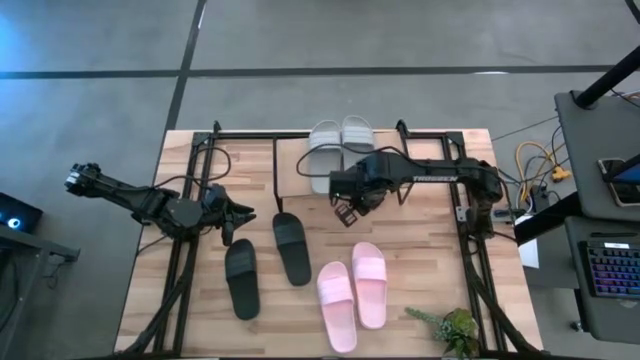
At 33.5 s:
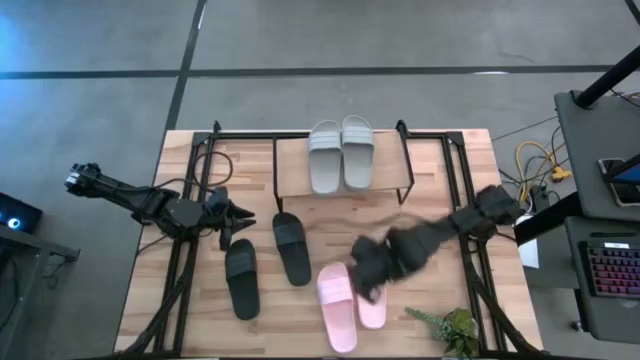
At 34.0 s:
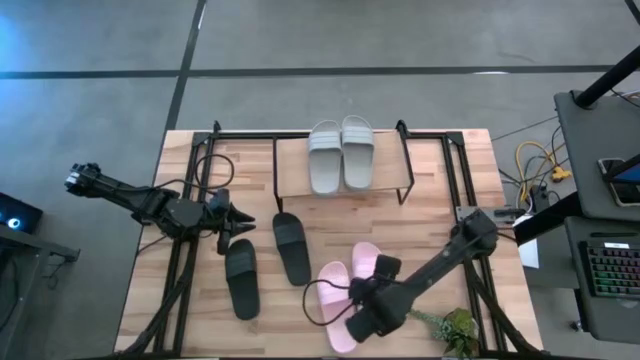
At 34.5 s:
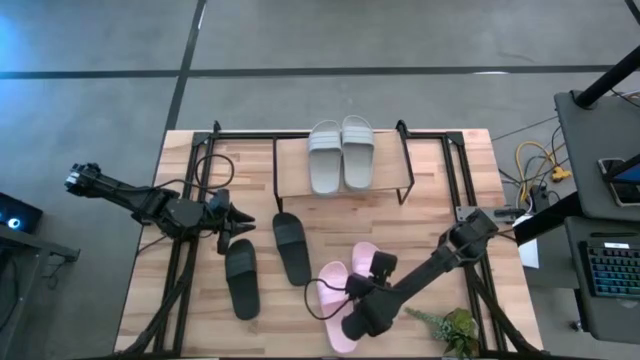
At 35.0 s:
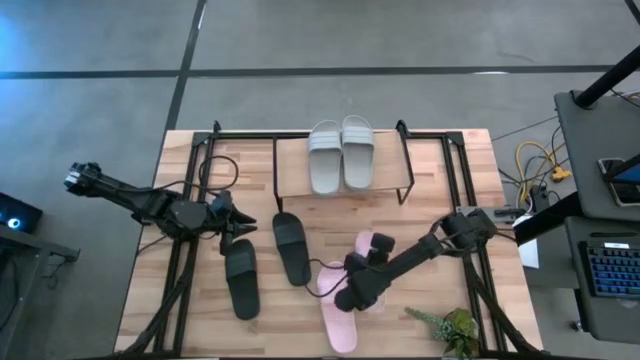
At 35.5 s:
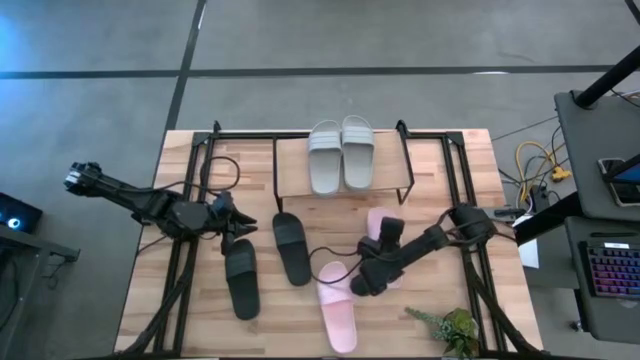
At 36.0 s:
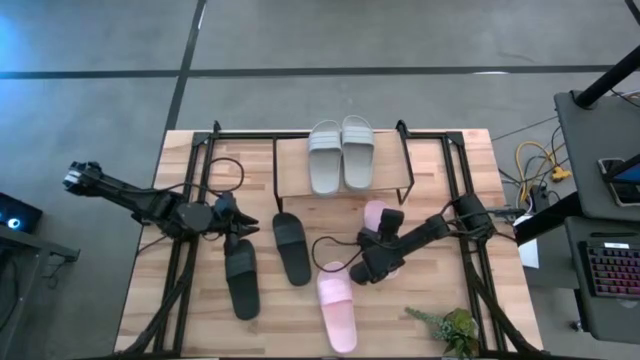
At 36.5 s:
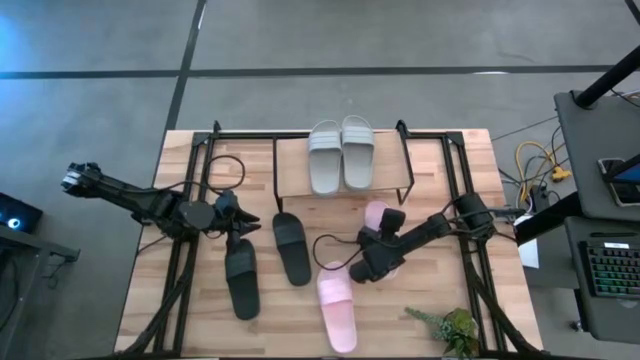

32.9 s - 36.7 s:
Task: Pick and place slides into the shelf
Put the right pink slide under the shelf

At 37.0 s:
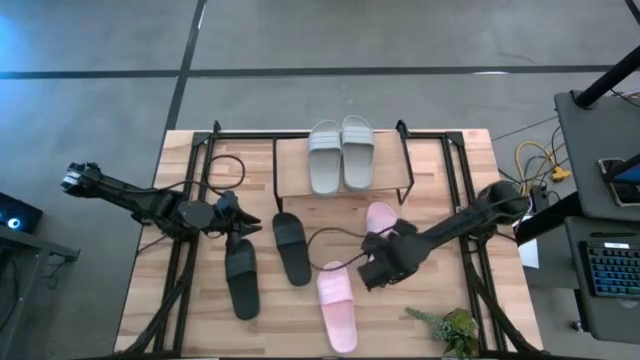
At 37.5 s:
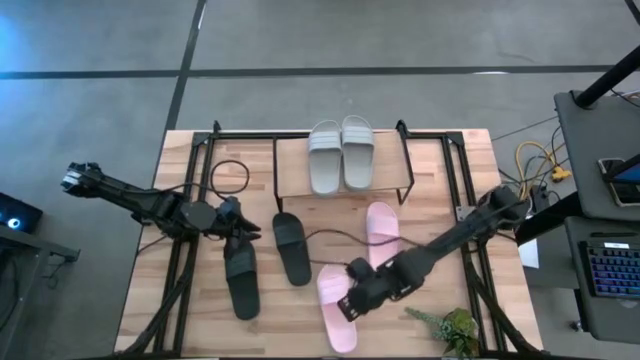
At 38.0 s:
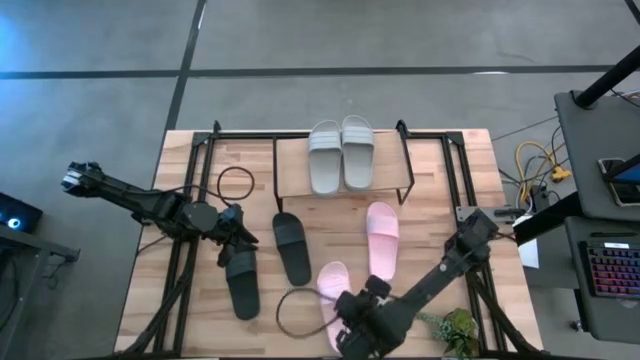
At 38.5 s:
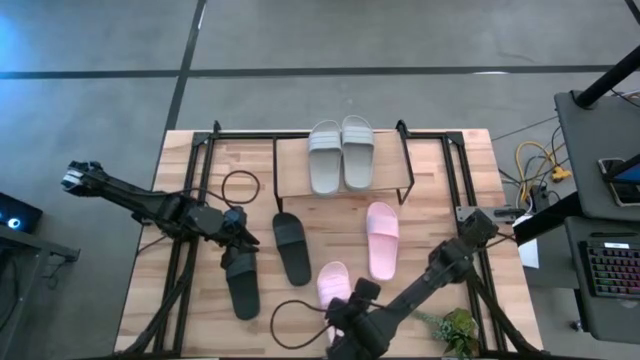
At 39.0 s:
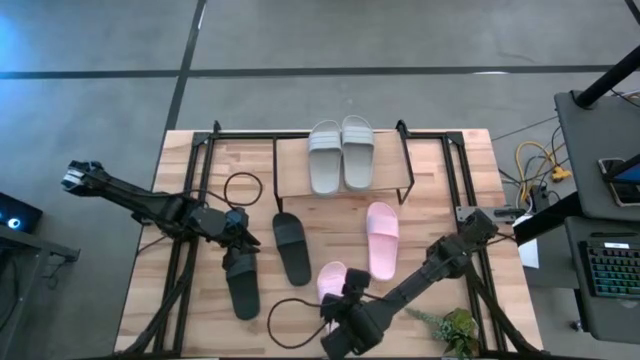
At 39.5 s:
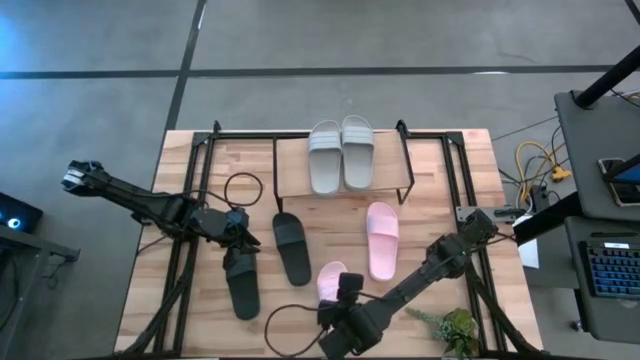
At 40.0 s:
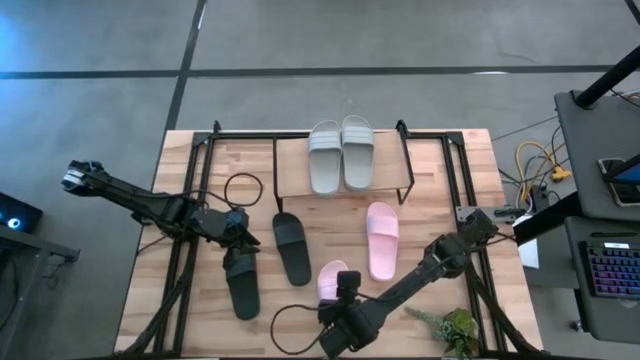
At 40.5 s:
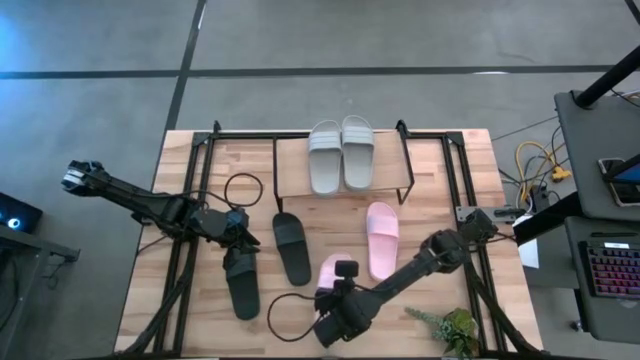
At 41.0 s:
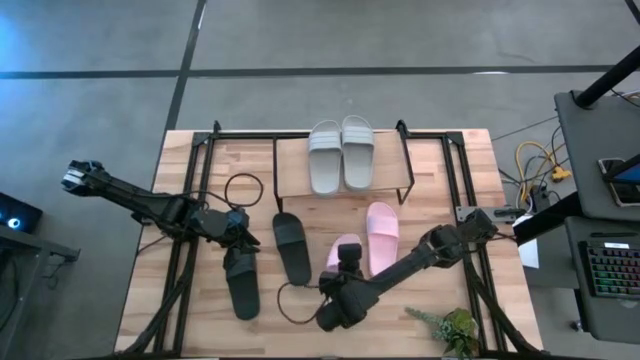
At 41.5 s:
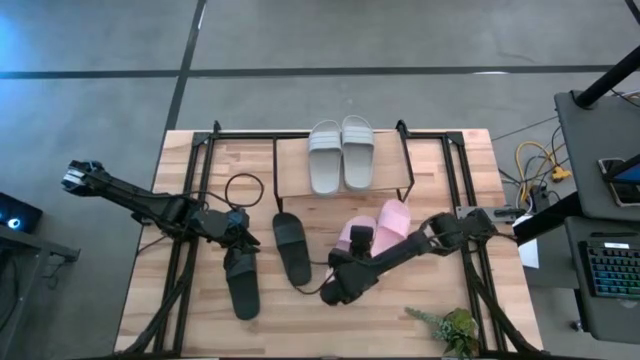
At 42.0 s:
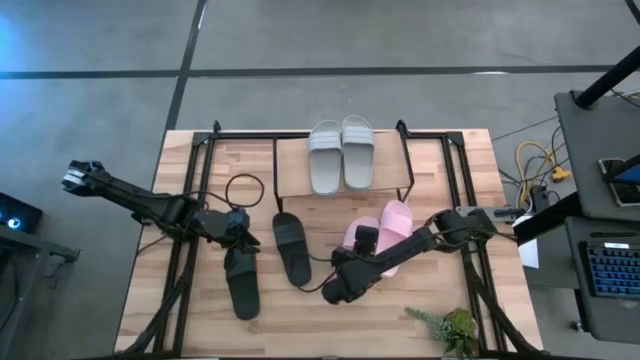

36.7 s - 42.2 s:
Put the pink slide under the shelf

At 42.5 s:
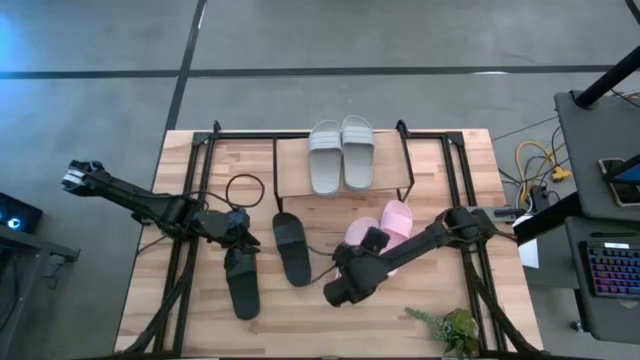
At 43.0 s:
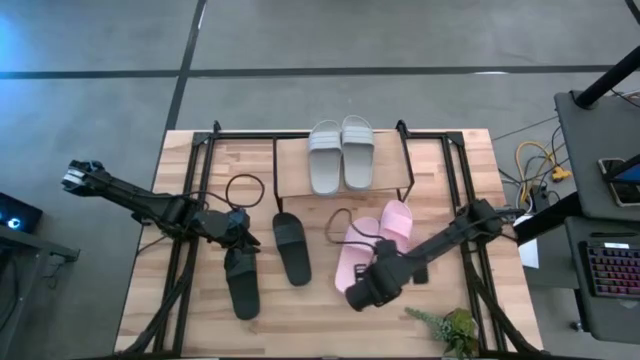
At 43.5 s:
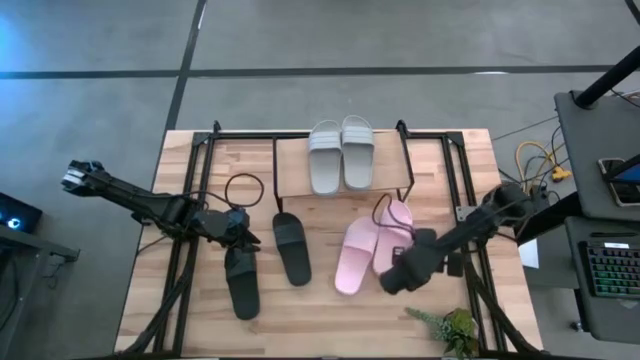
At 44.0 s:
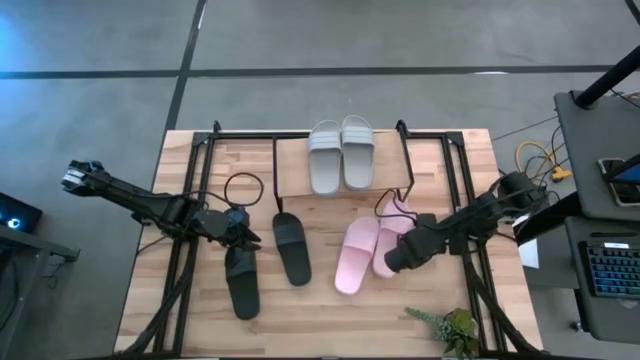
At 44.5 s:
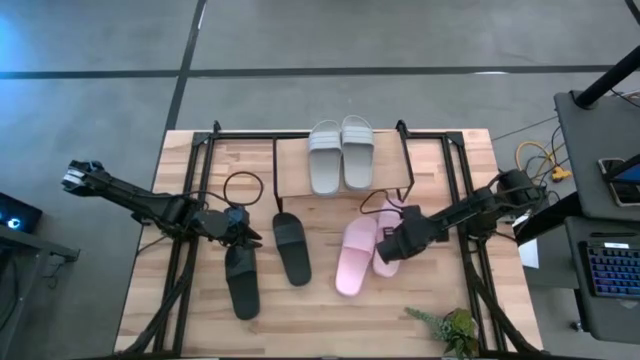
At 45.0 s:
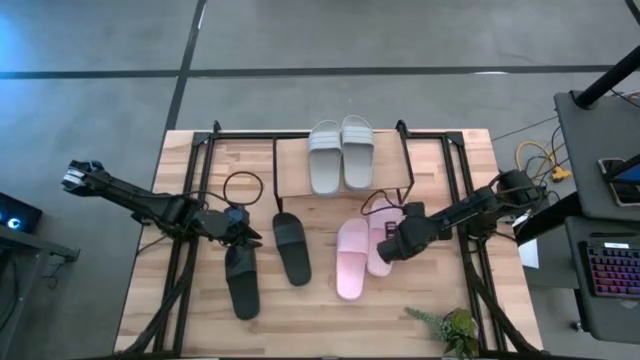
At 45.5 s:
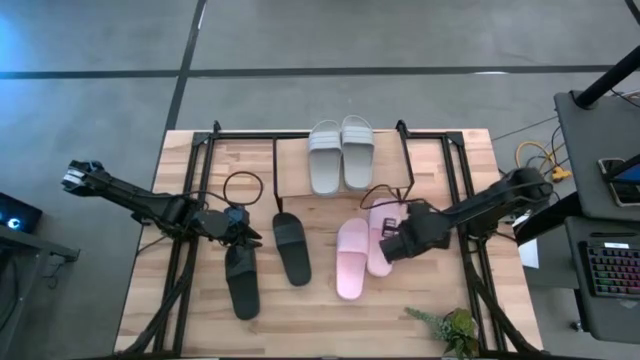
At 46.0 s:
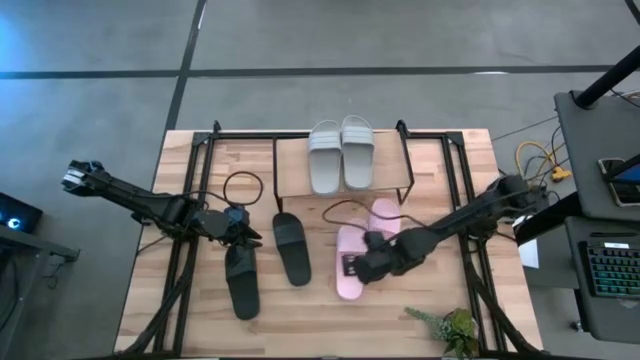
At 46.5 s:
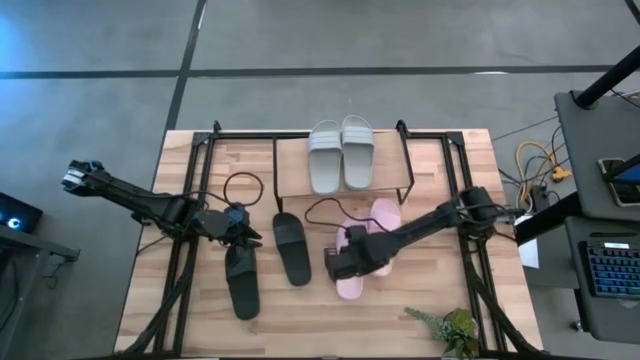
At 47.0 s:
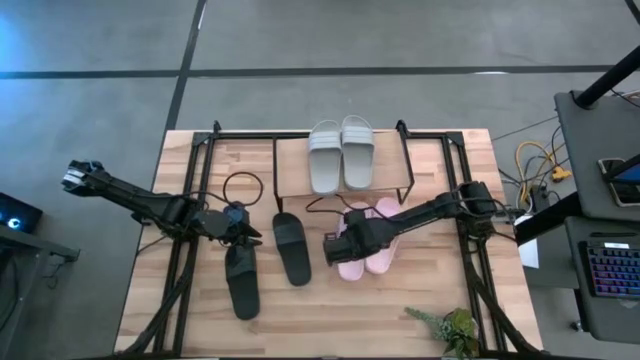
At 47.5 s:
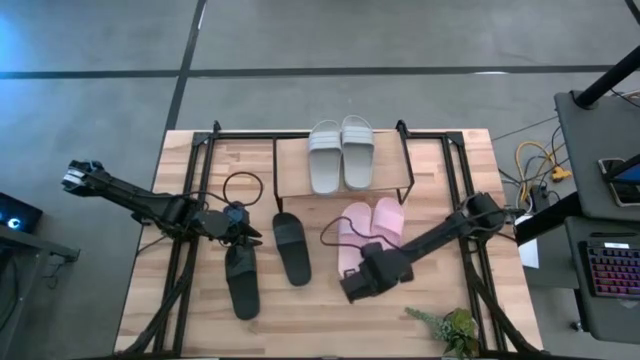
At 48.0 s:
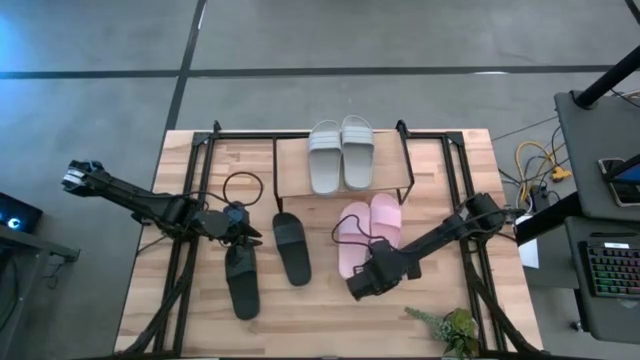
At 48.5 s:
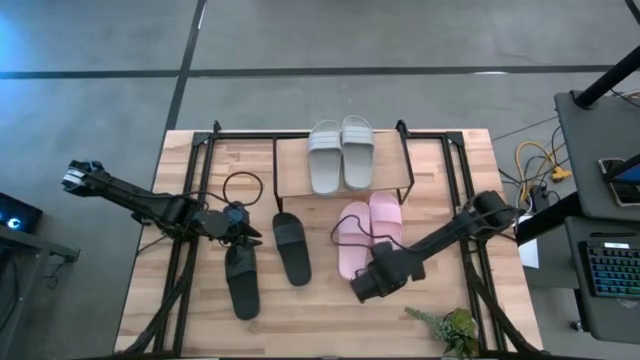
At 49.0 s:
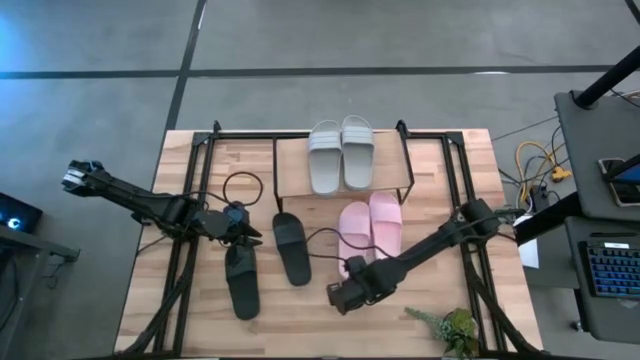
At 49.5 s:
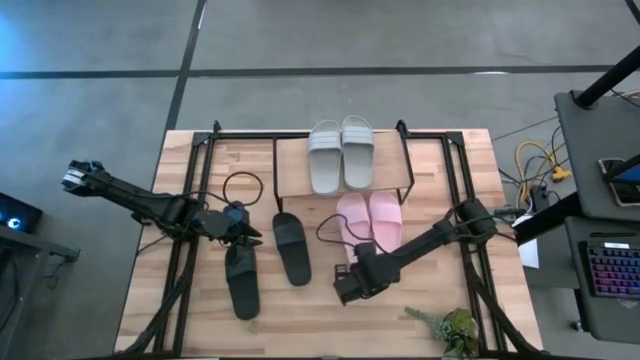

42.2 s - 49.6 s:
Adjust the pink slides under the shelf

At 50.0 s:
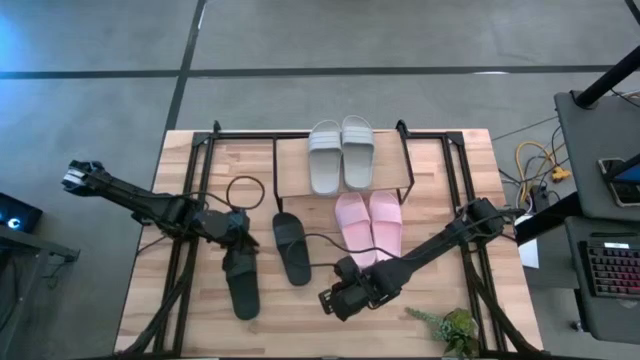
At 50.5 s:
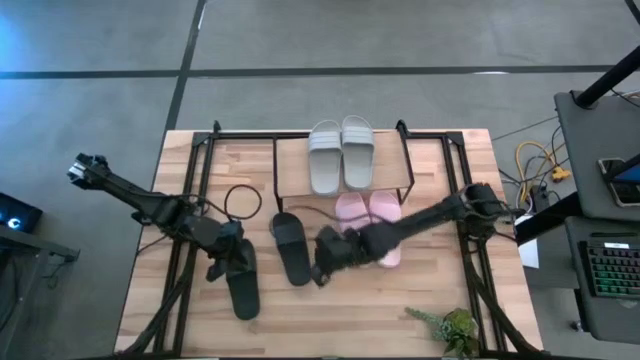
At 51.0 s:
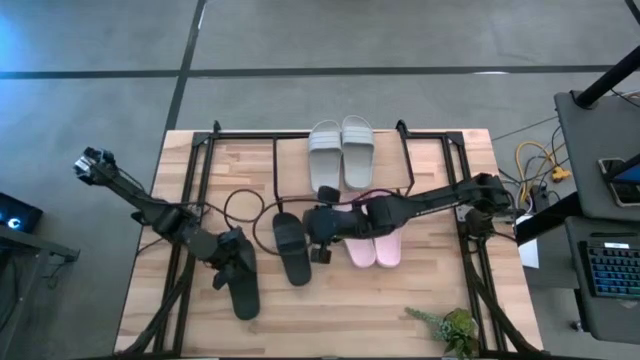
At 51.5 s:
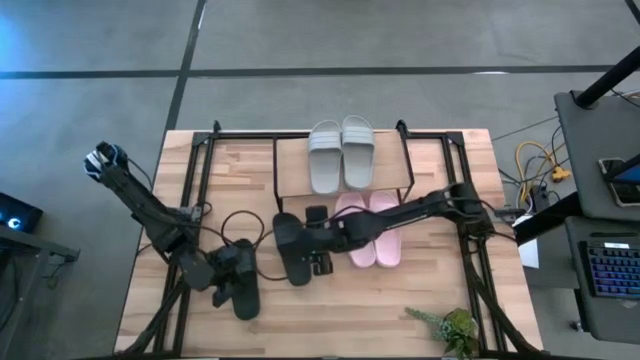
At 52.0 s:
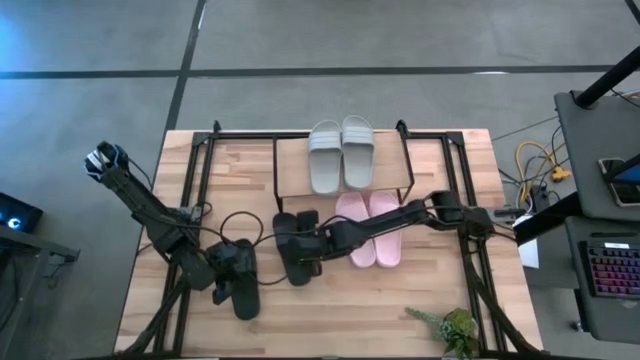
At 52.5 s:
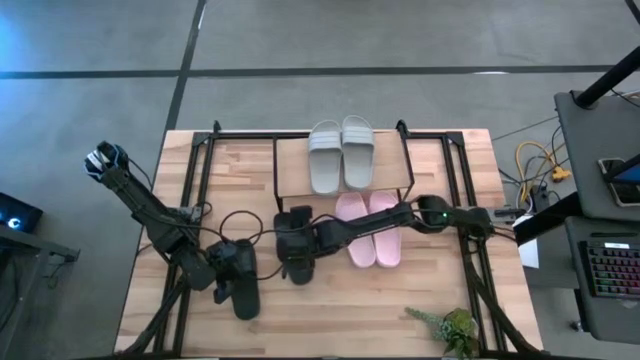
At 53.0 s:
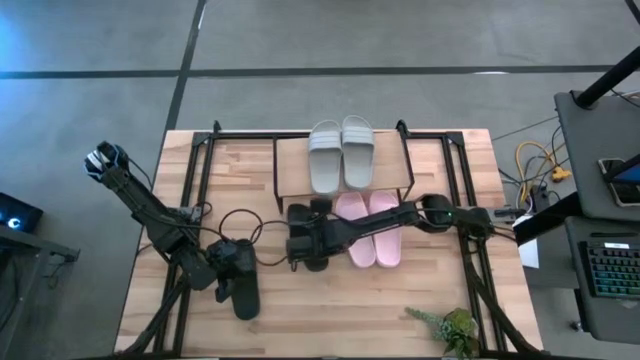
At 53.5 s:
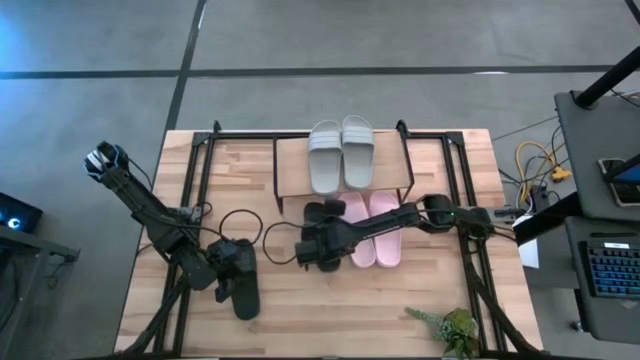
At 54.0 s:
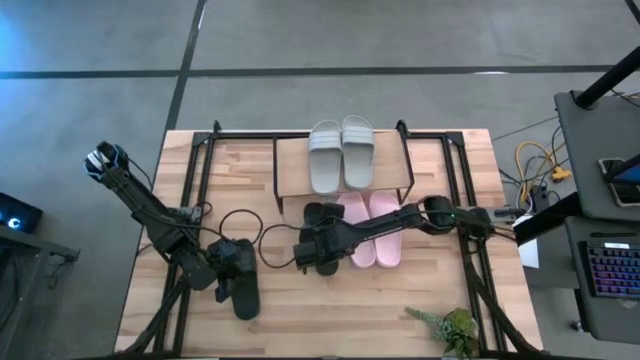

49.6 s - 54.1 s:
Put the right black slide under the shelf
